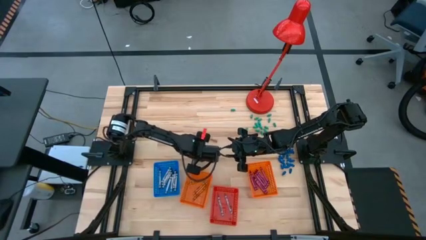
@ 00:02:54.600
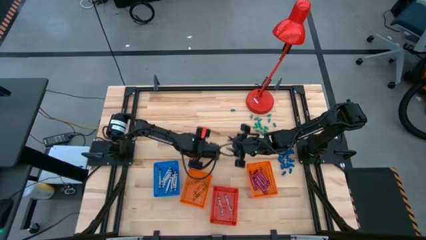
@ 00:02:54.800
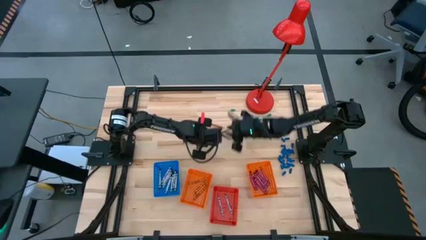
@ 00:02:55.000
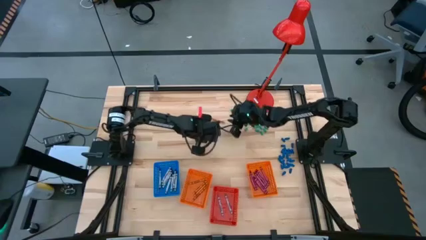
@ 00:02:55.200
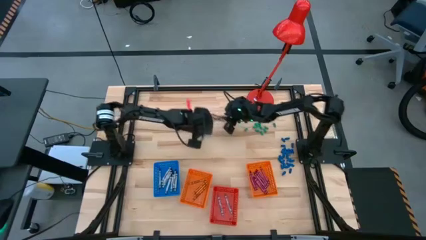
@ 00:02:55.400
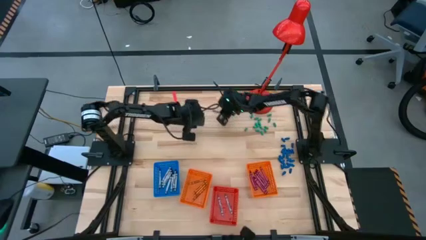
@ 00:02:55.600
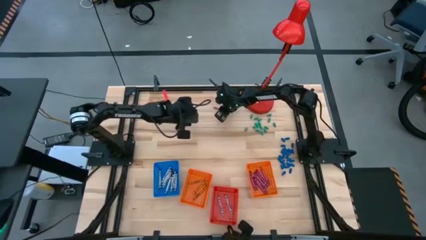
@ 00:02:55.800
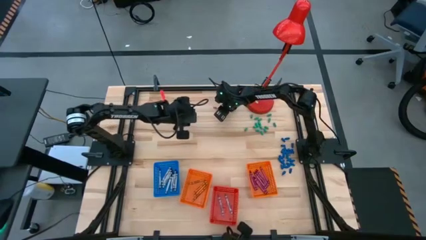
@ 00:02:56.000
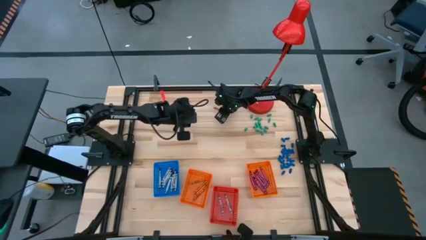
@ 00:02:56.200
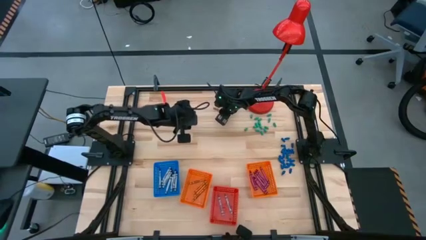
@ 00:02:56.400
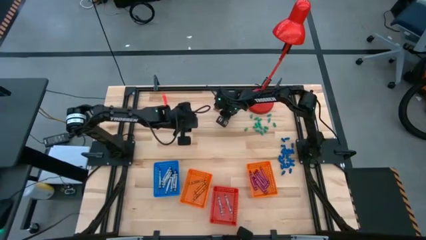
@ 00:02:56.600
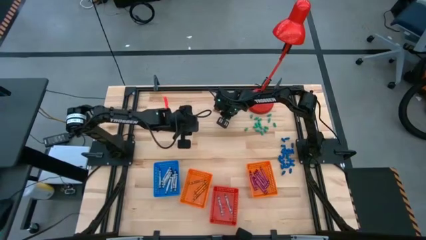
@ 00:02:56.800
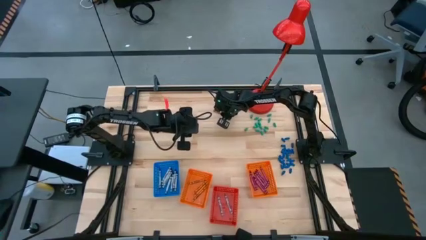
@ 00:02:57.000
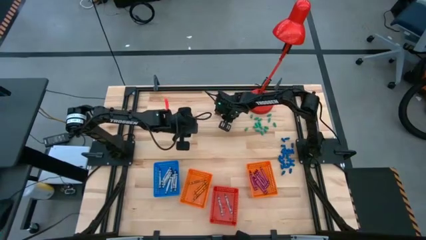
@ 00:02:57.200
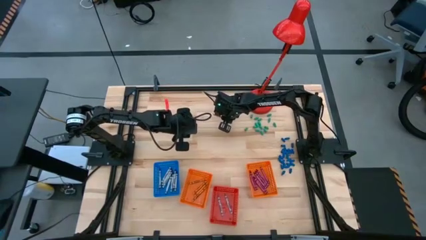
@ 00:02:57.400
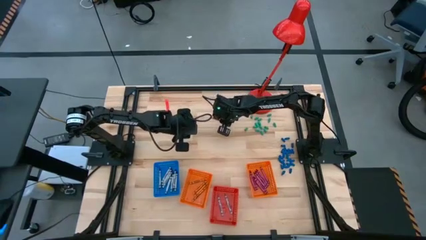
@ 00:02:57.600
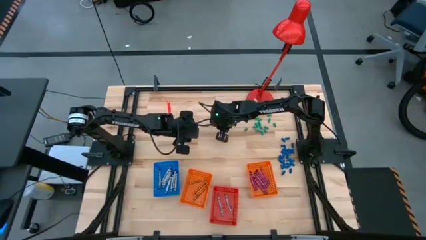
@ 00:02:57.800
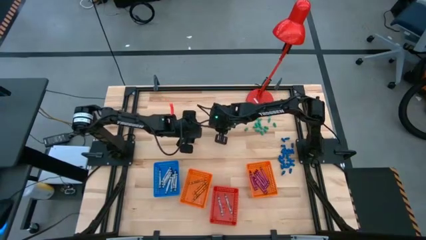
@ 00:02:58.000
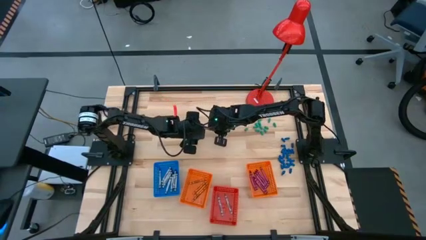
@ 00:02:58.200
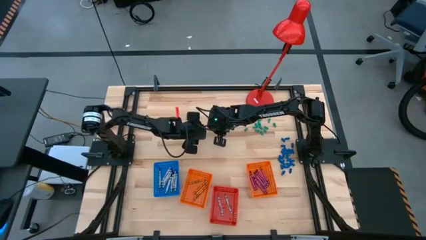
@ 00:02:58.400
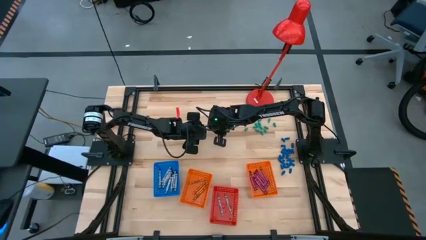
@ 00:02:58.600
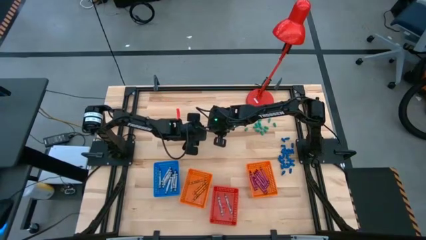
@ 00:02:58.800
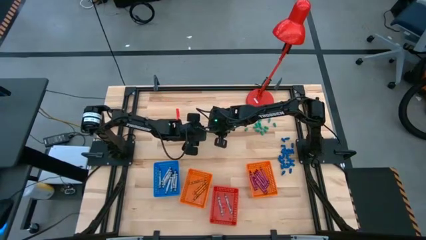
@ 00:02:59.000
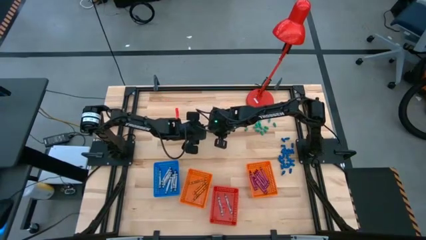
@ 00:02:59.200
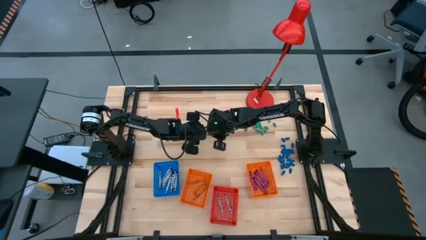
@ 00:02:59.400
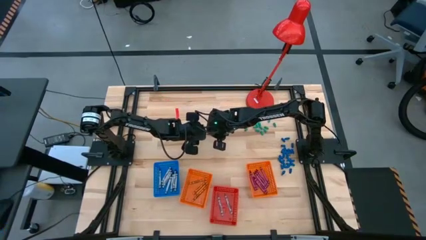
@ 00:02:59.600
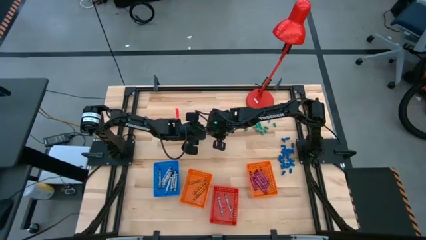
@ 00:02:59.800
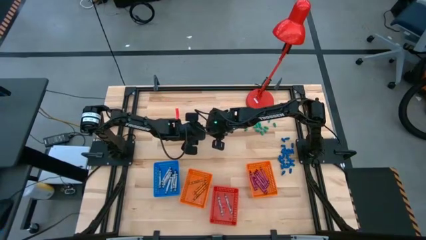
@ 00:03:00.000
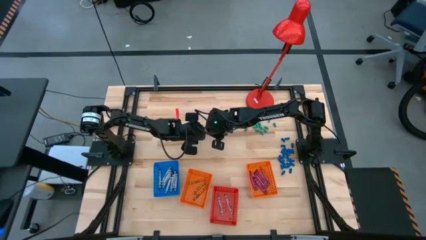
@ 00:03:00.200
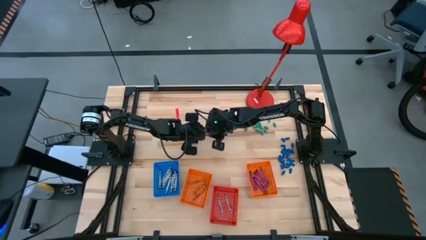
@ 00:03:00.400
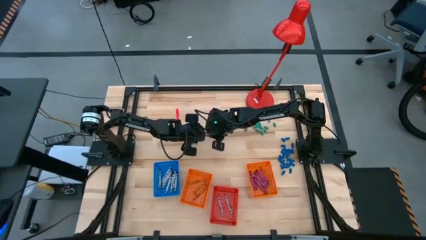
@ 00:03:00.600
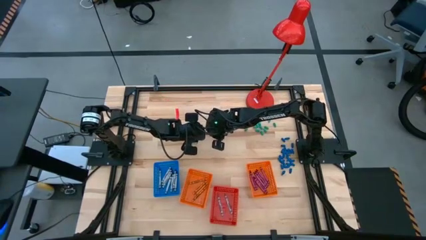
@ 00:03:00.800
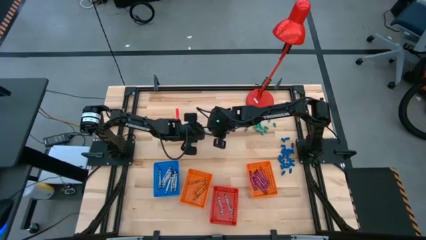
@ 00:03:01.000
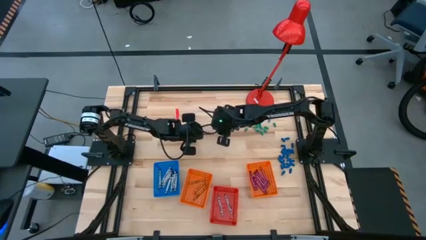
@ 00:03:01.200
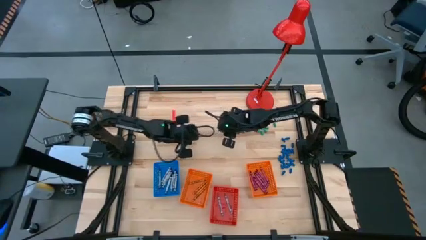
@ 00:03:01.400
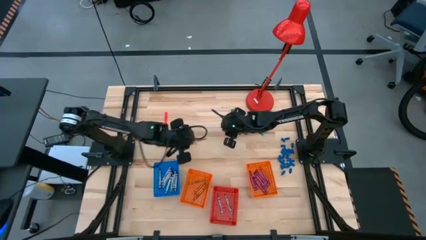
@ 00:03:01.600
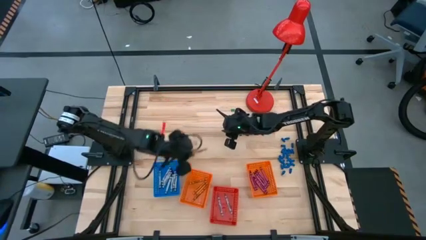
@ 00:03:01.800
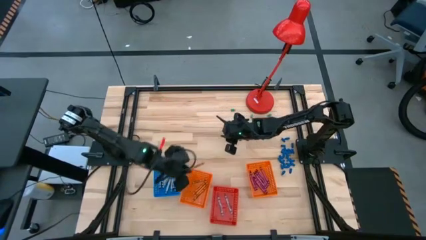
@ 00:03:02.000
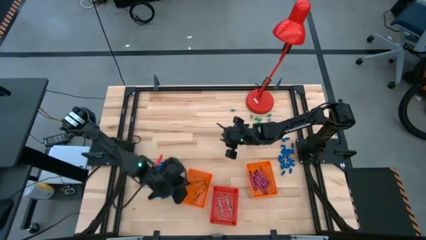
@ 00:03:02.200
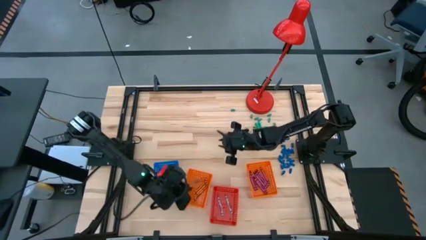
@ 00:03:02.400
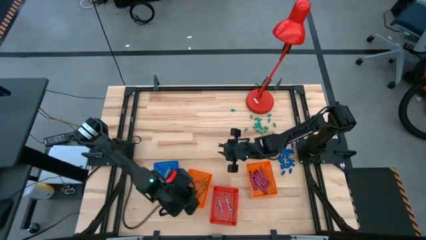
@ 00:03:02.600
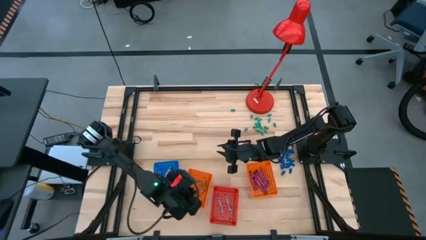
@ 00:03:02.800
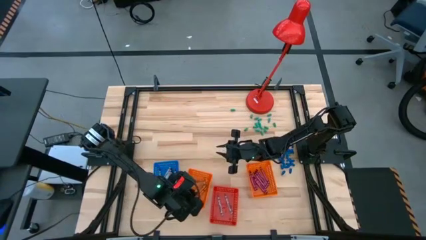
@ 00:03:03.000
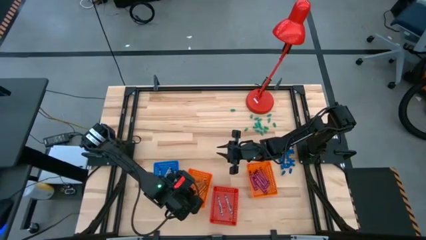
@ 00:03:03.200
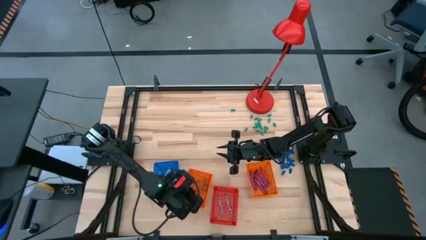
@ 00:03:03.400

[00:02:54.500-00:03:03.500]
Task: Sort crayons
Put the orange crayon into the left orange bin

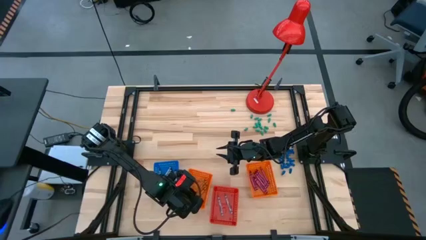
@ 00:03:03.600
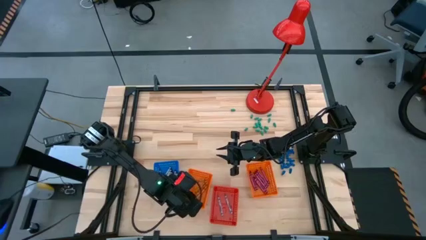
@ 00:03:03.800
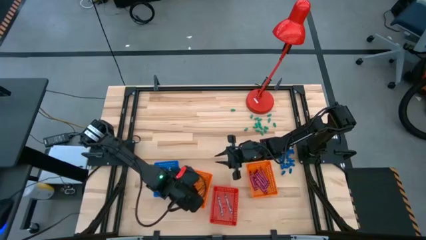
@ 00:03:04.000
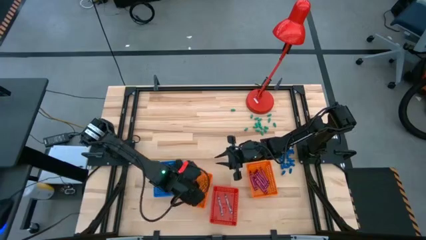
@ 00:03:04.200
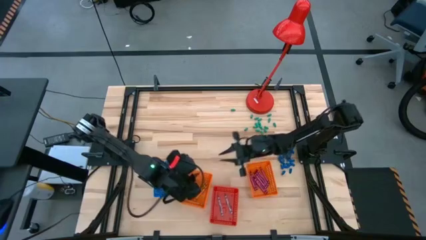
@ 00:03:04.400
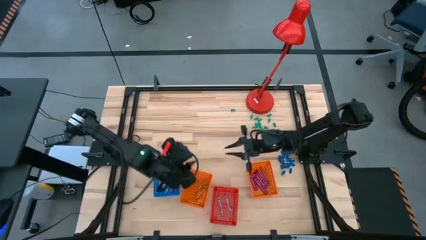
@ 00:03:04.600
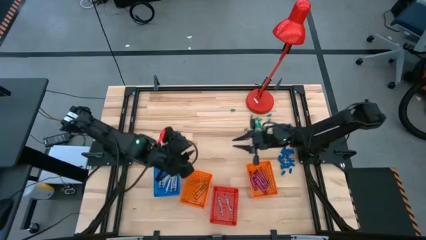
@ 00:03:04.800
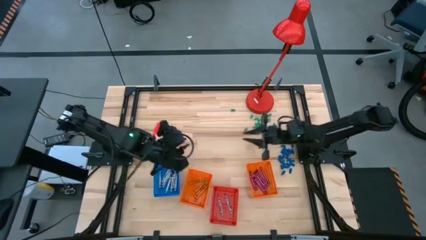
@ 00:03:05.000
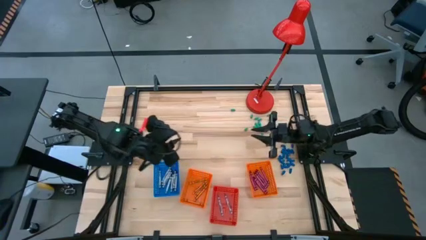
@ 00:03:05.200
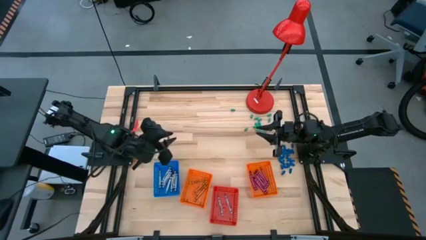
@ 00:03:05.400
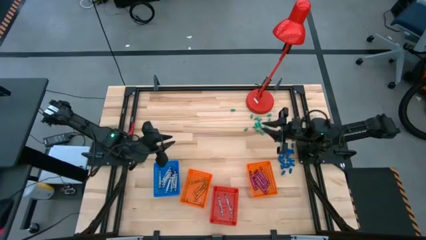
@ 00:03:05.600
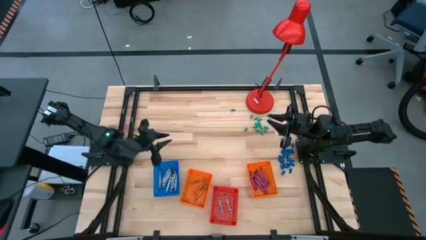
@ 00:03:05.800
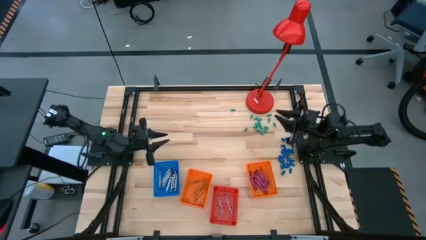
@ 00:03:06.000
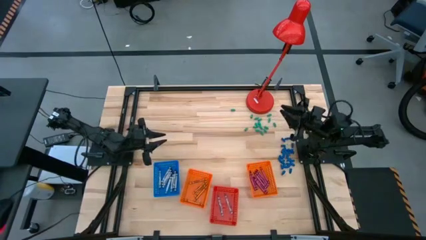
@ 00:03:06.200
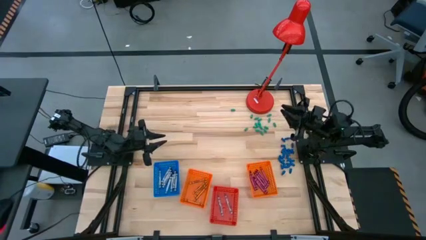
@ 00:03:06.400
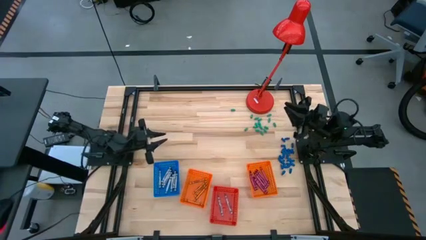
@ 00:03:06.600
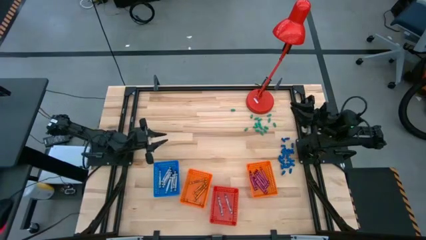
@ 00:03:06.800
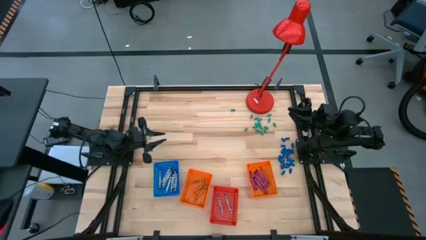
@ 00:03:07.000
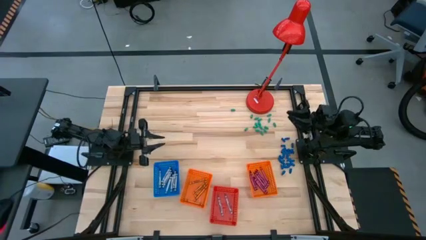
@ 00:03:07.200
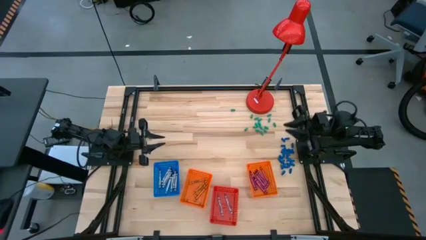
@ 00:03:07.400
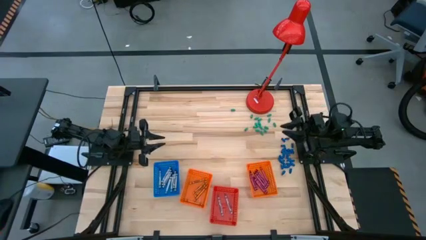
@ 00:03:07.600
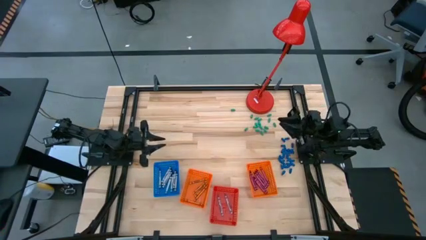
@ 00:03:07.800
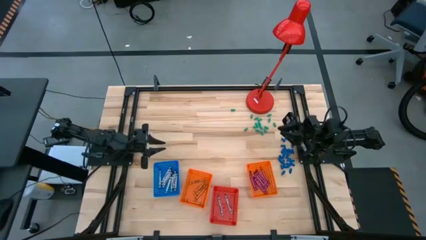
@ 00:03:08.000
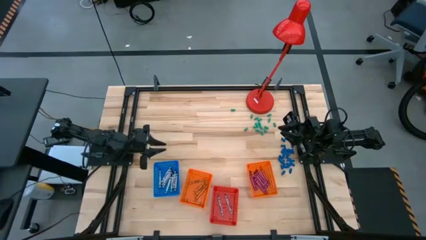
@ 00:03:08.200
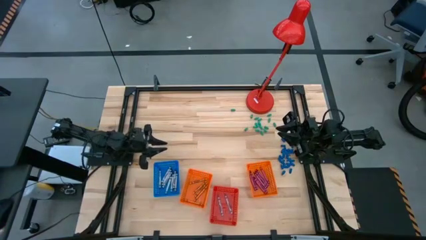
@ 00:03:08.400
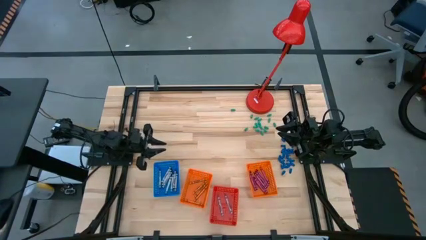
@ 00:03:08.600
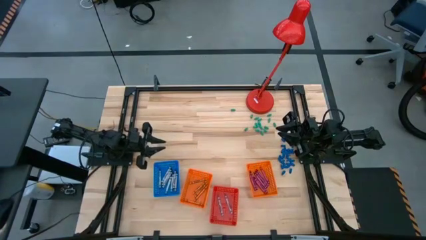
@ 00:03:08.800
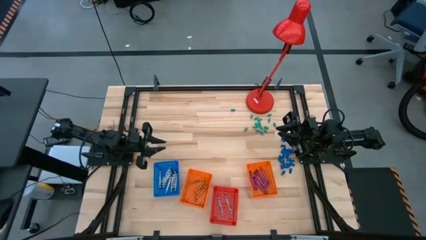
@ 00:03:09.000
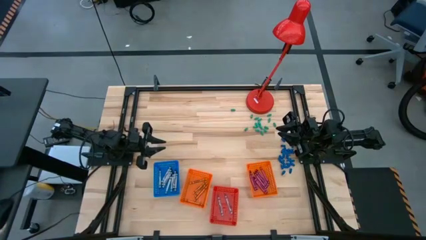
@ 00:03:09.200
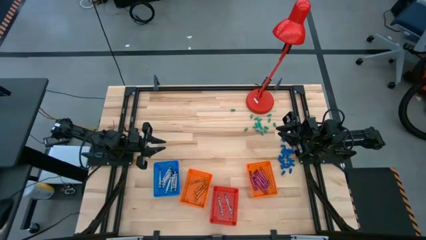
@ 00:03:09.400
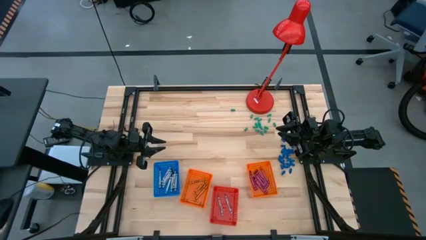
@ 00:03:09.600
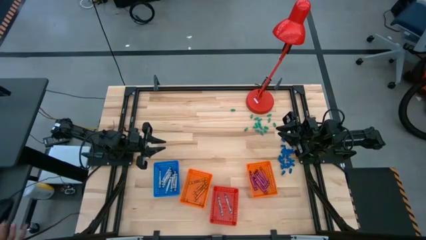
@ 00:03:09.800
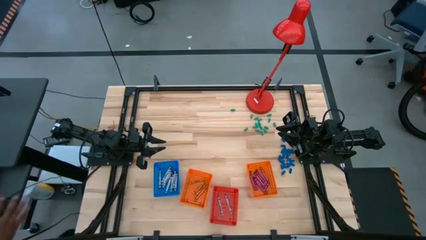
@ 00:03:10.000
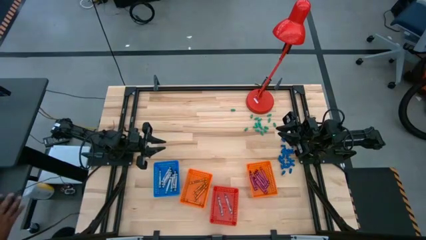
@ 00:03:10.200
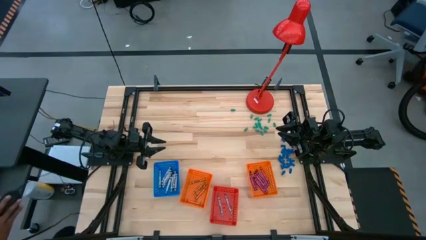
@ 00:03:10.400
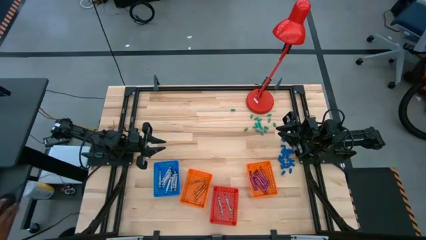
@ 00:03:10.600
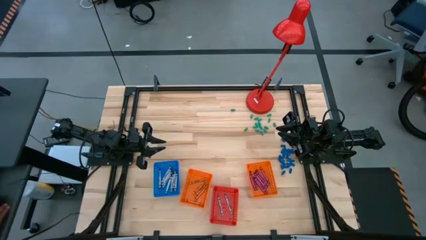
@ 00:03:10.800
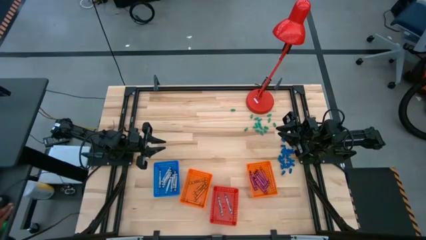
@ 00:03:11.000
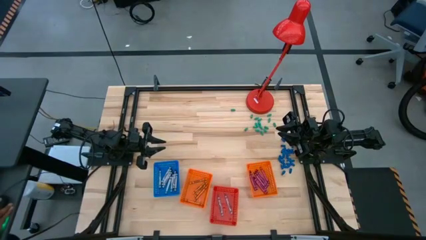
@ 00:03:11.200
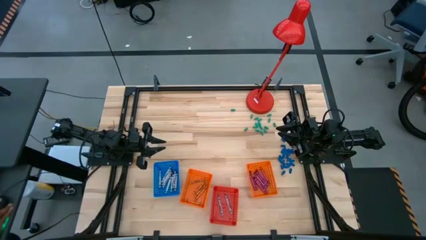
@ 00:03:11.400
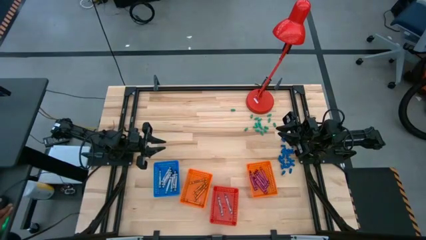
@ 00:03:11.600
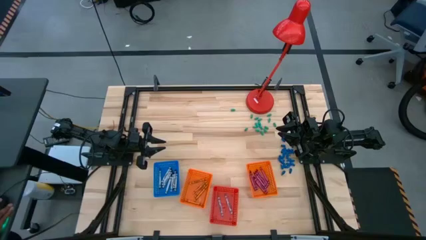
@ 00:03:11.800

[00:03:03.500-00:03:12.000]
Return to Home Position
